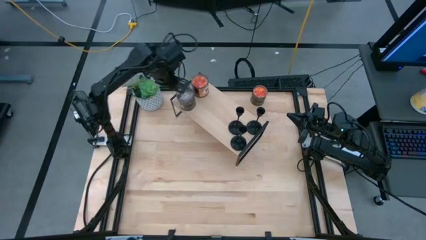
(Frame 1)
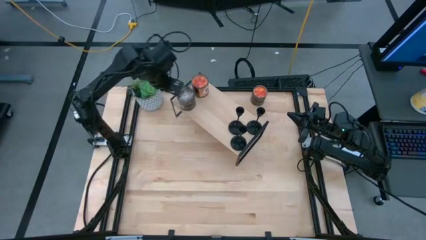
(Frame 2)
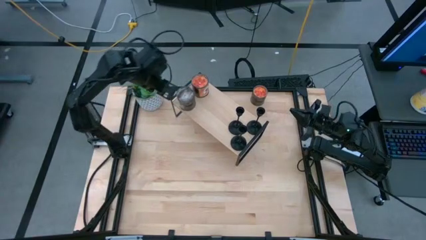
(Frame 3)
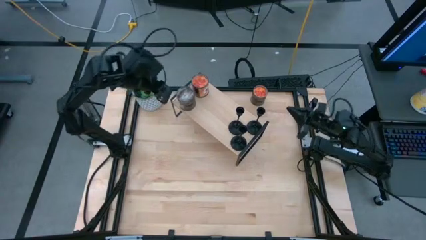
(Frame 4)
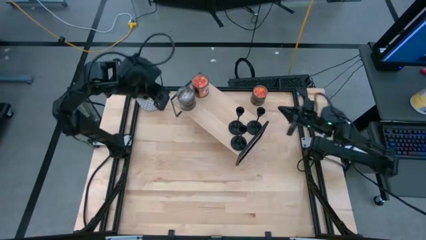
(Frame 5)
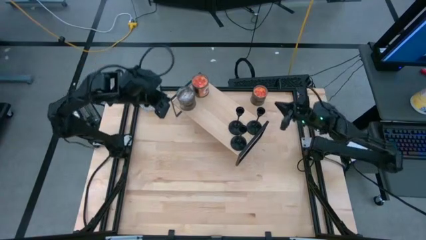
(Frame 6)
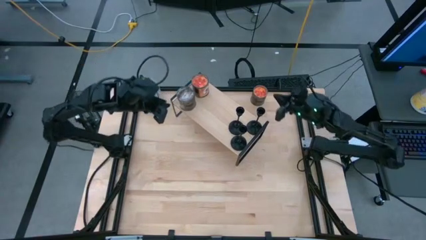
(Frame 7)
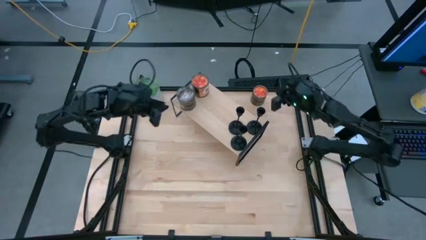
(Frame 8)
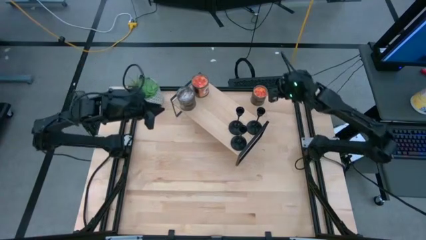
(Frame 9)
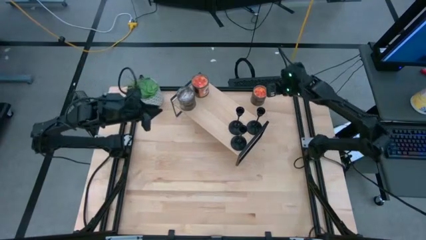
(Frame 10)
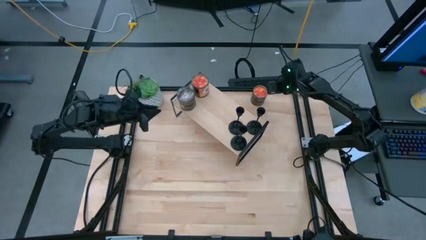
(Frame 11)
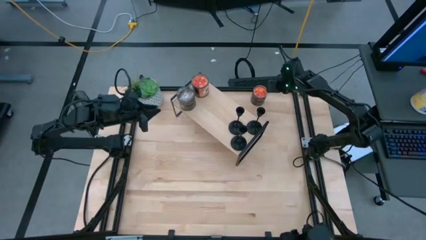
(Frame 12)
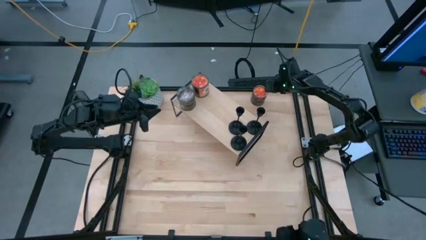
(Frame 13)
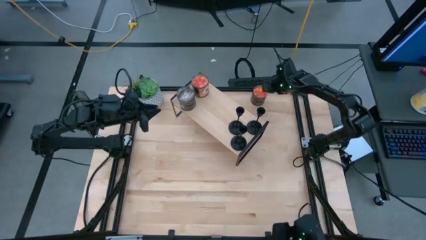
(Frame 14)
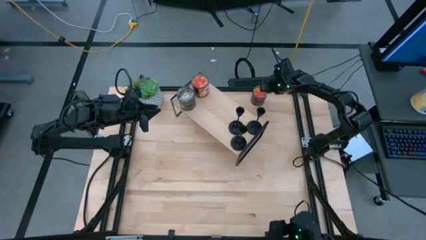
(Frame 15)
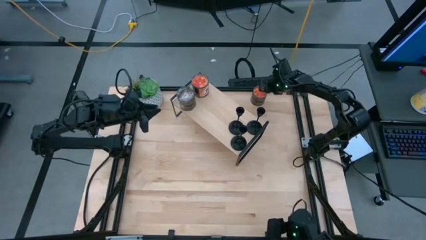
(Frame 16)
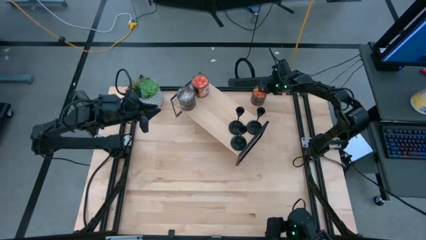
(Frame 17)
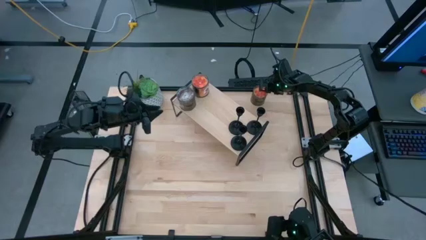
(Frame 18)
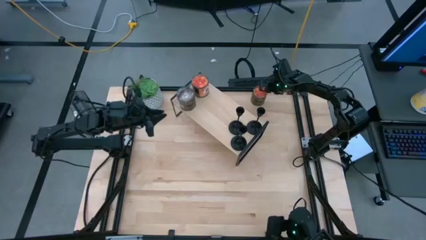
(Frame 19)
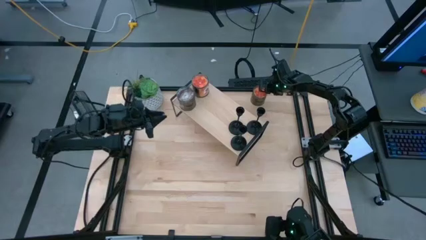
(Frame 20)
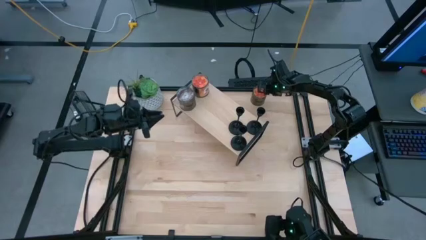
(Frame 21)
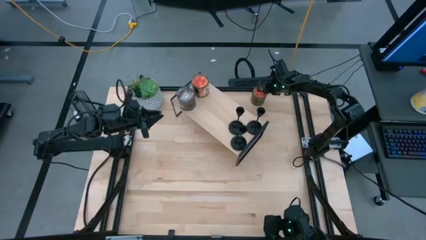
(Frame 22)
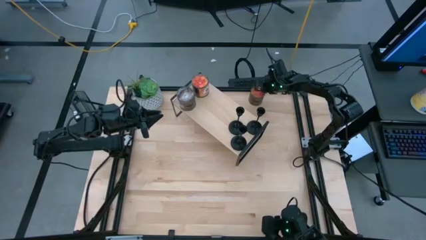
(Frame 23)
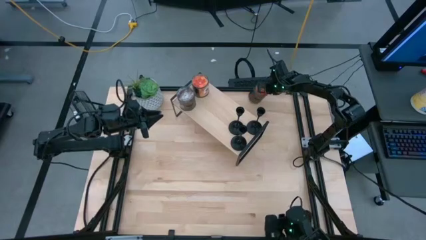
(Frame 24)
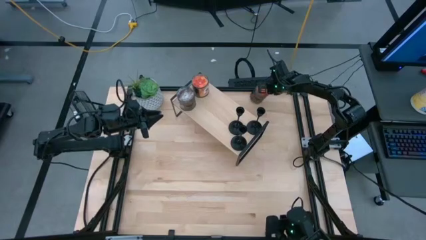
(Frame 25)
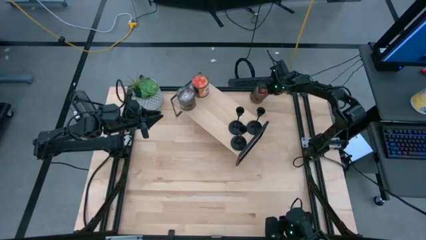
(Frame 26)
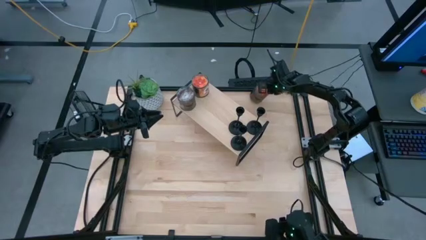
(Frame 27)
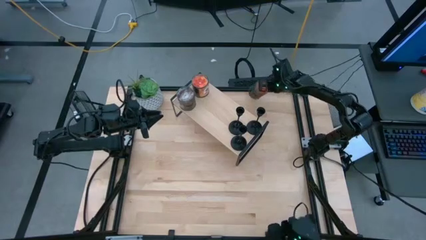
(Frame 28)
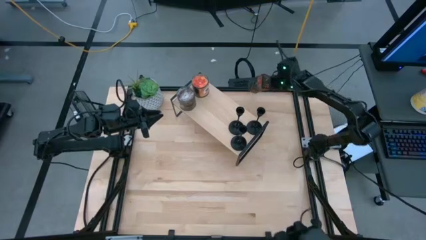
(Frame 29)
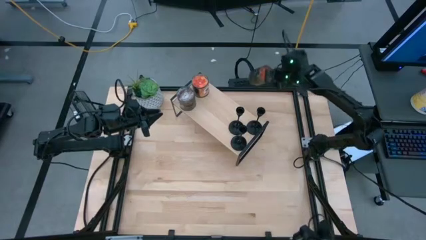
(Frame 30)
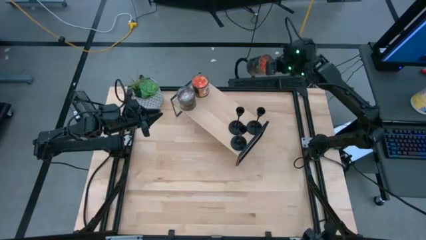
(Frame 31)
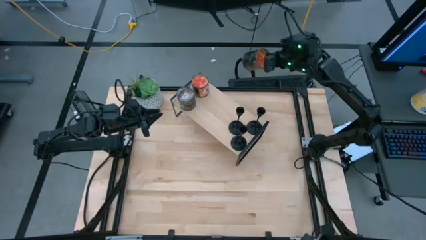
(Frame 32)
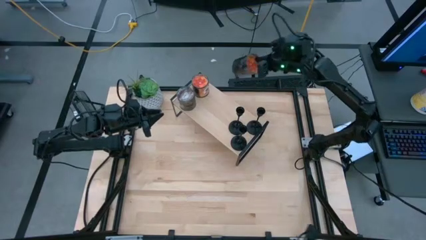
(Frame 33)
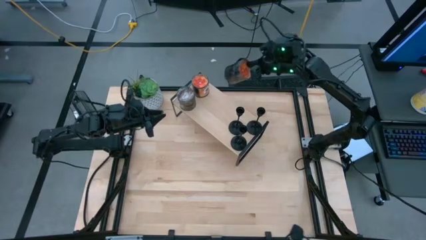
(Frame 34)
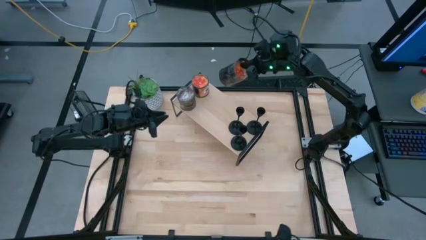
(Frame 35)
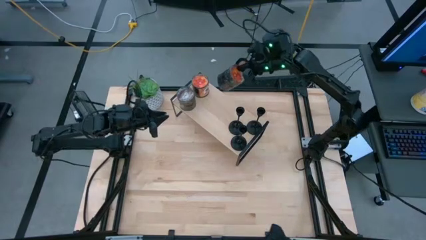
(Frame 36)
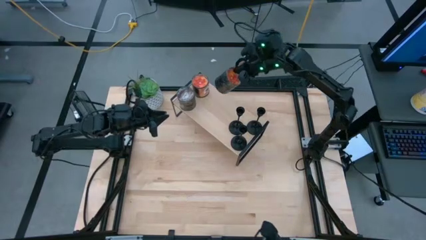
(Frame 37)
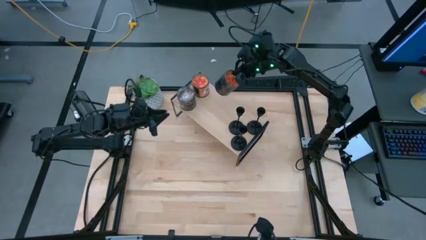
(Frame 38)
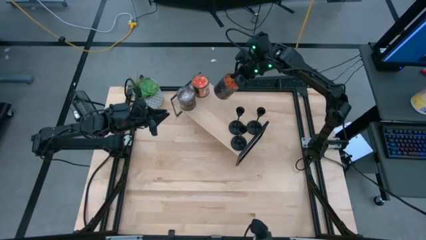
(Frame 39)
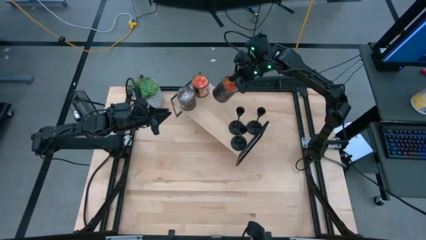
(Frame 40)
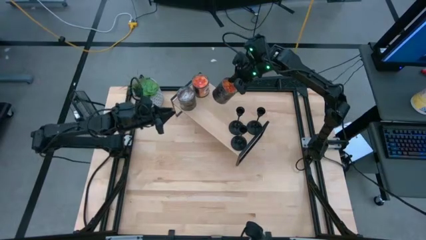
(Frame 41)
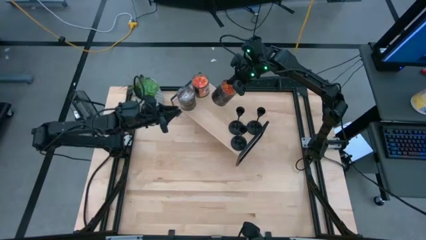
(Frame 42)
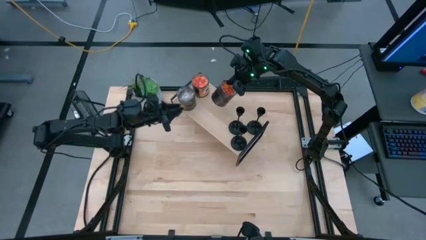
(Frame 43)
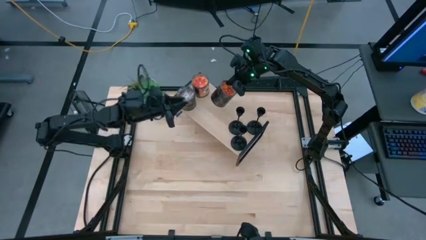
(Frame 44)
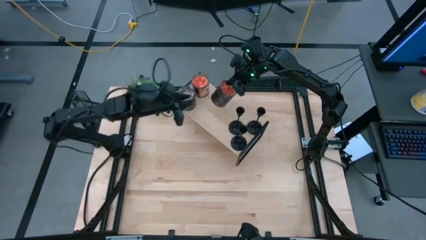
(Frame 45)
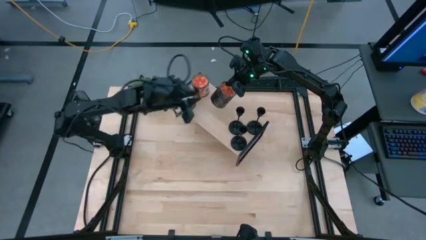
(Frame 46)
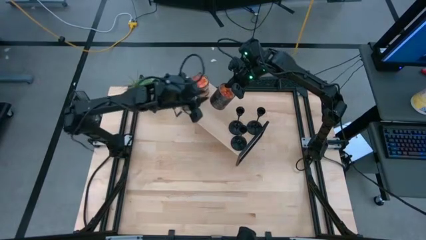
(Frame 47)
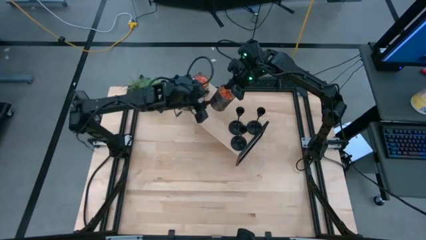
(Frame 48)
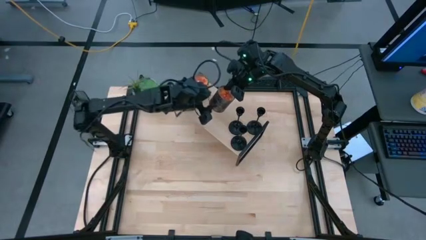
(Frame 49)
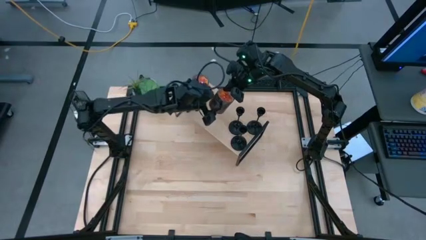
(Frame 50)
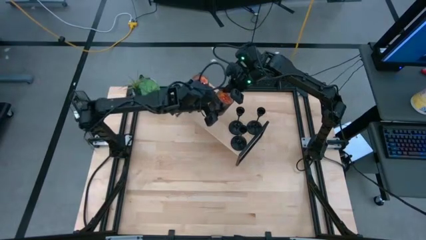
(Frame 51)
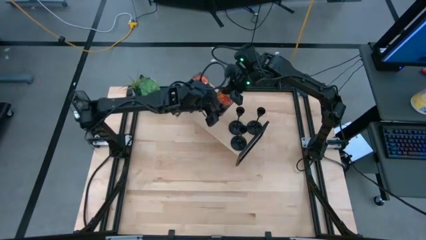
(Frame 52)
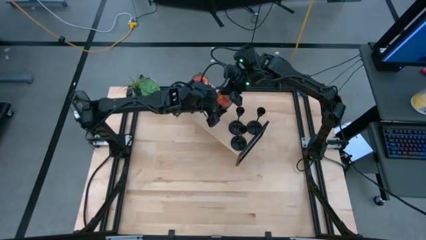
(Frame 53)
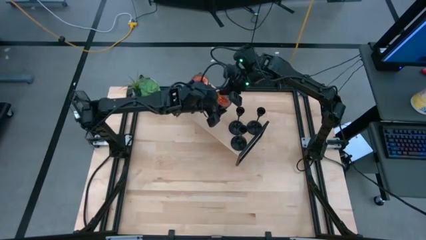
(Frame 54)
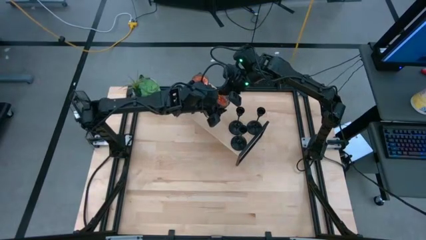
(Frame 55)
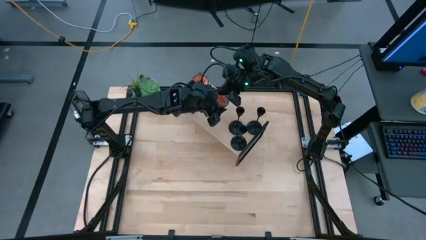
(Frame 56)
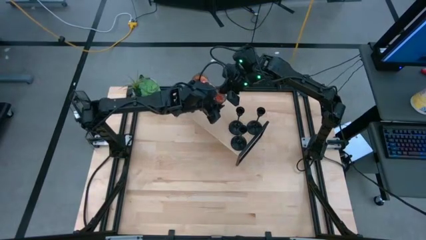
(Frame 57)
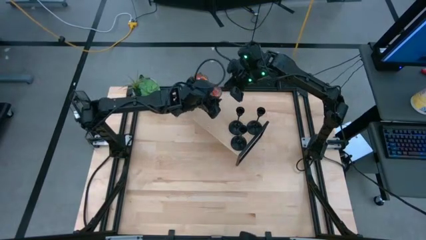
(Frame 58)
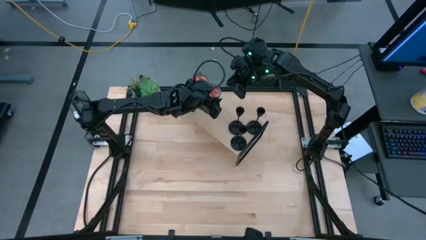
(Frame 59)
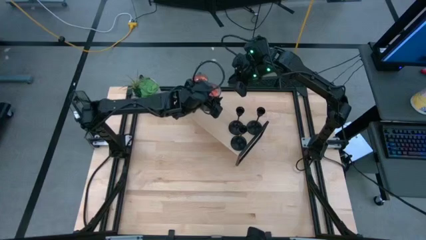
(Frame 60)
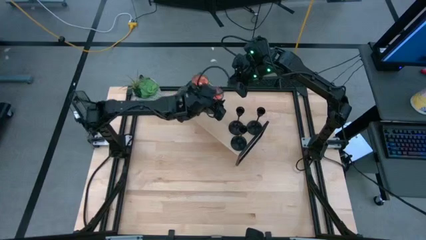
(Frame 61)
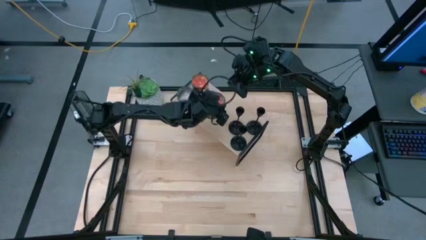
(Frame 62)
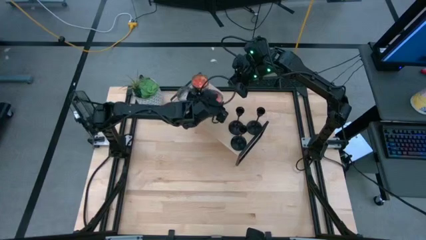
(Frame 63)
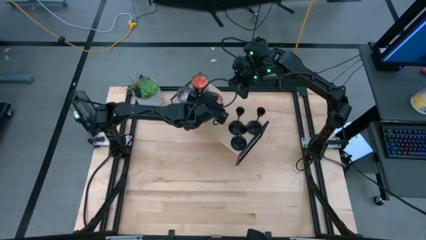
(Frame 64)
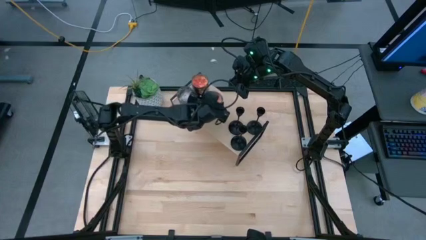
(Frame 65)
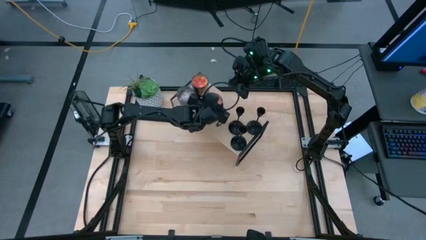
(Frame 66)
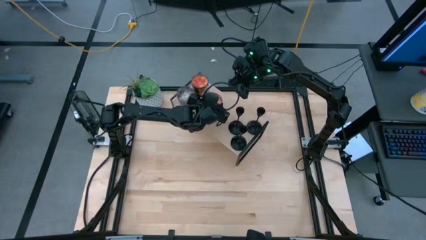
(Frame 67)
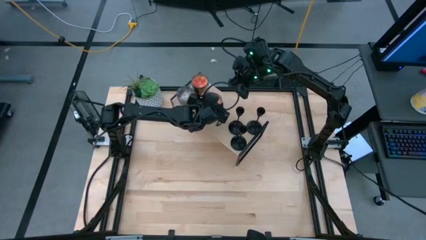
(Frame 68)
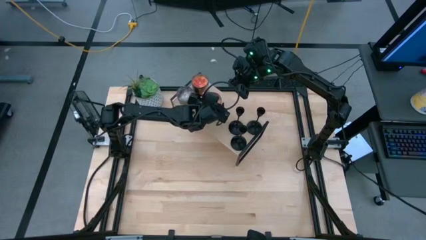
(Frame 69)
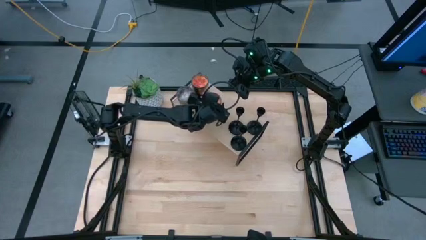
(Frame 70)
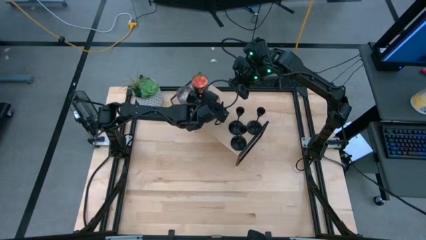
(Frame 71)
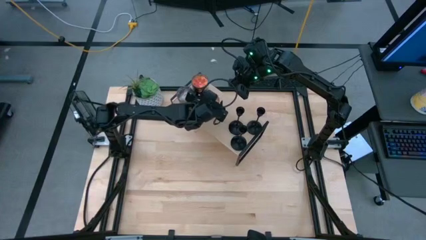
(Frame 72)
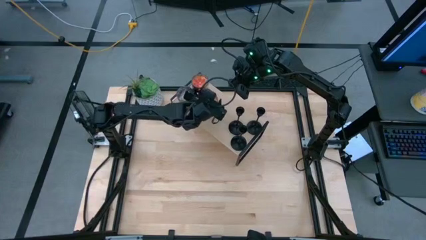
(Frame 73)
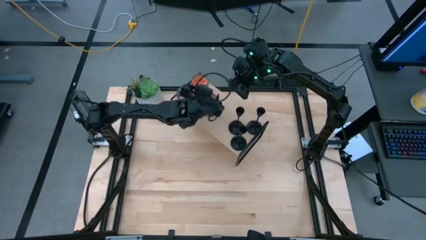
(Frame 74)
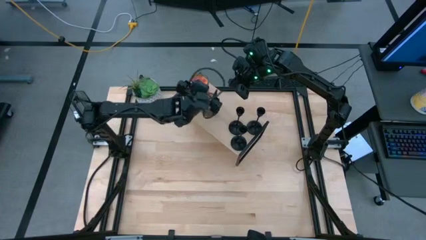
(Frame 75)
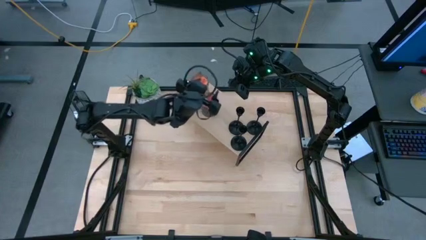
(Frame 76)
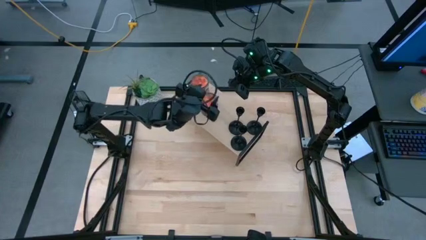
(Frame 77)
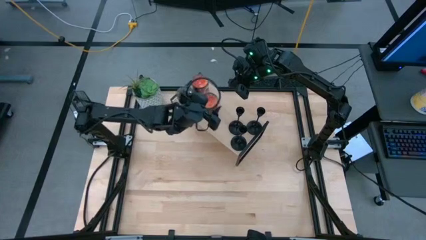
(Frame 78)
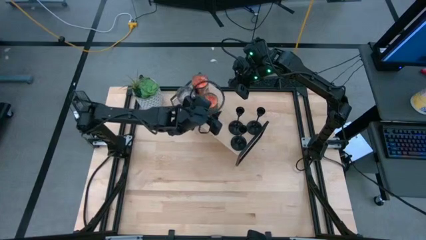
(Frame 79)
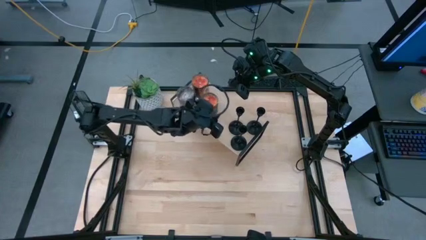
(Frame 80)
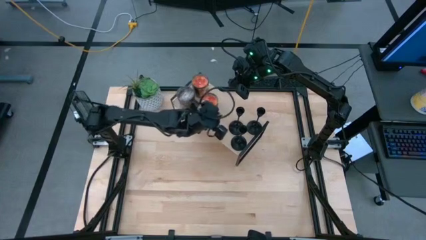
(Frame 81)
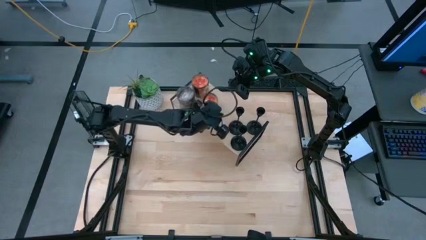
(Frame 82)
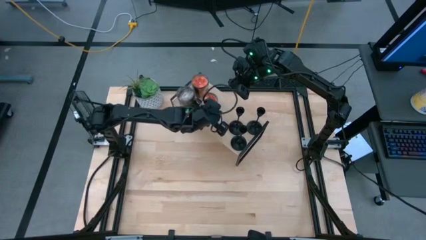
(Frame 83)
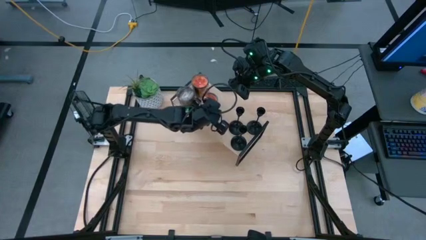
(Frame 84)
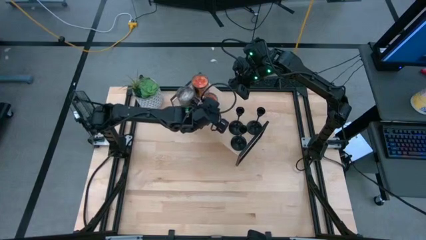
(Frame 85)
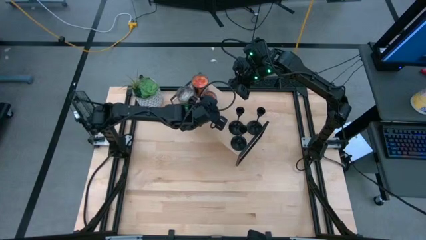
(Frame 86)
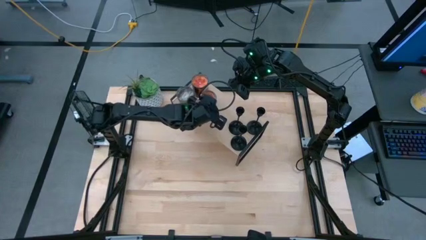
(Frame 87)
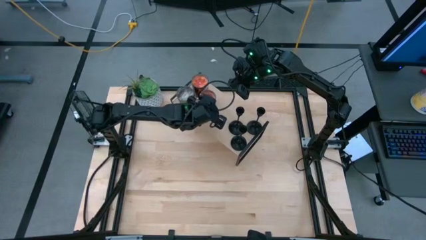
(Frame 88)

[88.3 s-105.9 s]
Task: Pick & Place candle stick holders
Put the orange scented candle on the shelf
